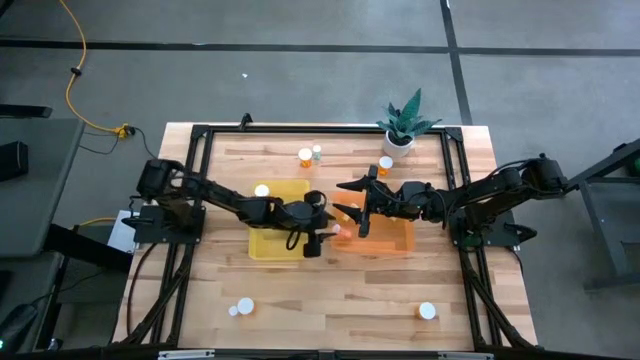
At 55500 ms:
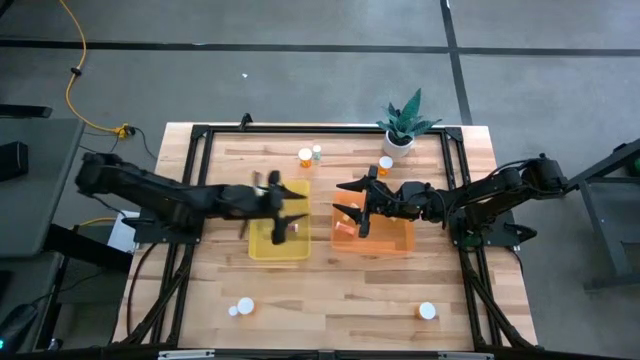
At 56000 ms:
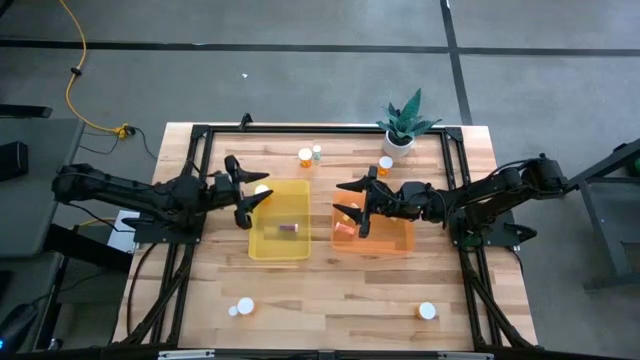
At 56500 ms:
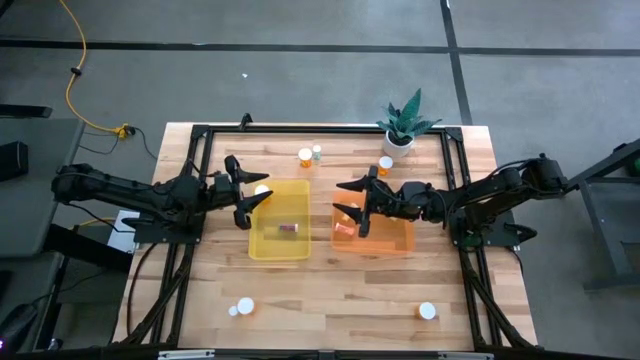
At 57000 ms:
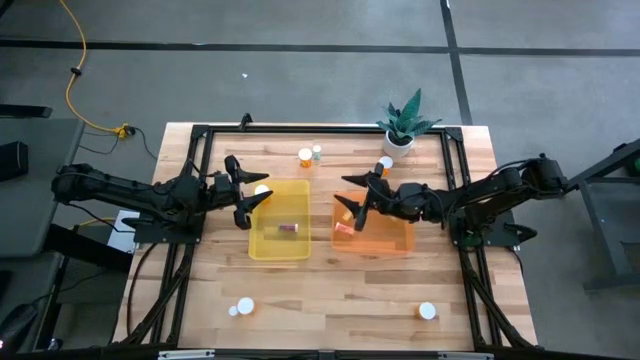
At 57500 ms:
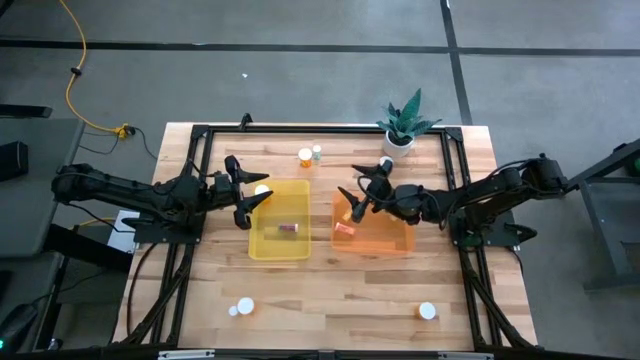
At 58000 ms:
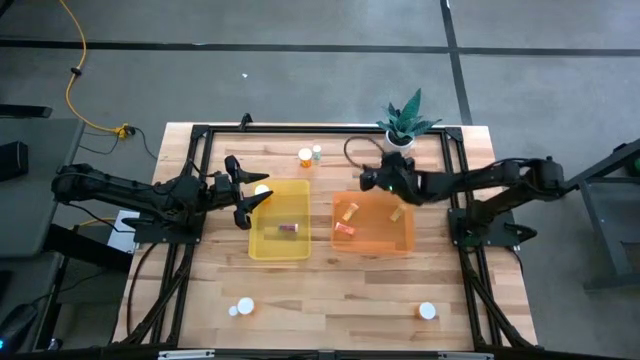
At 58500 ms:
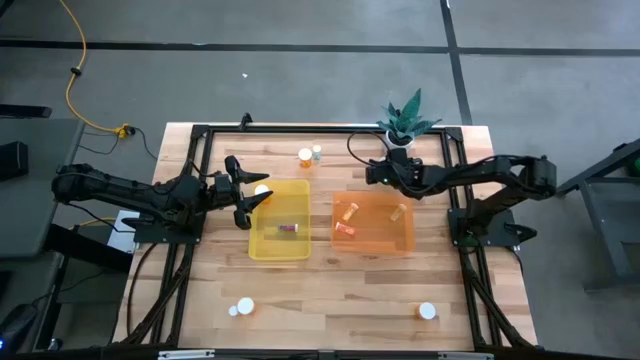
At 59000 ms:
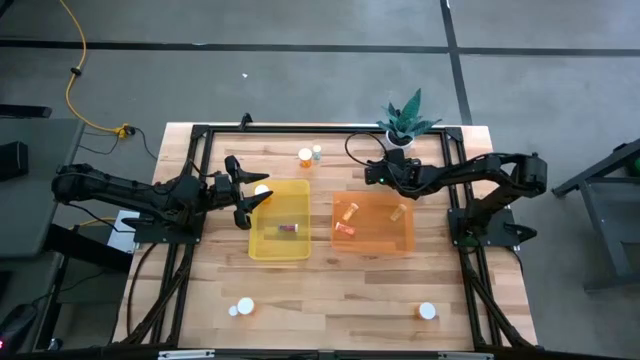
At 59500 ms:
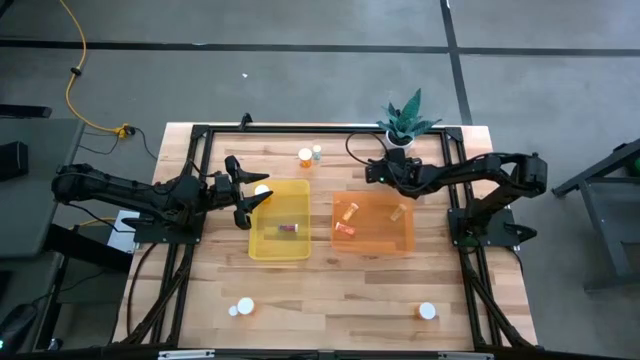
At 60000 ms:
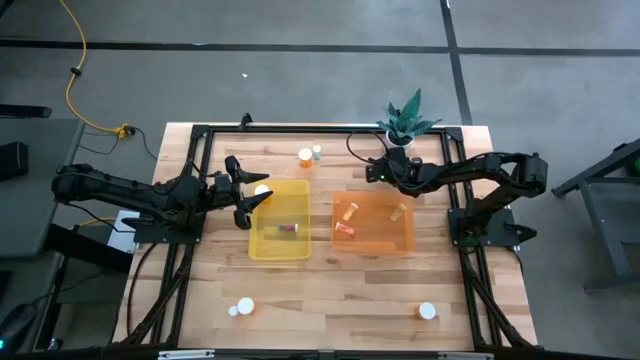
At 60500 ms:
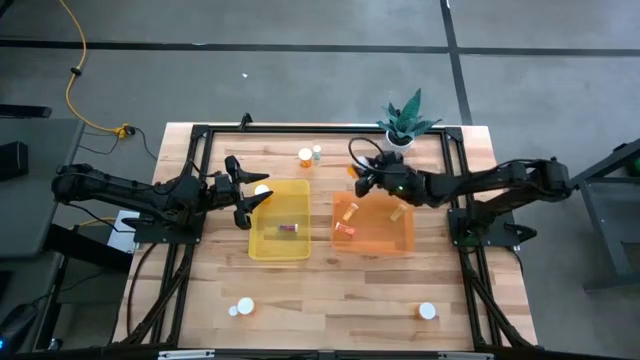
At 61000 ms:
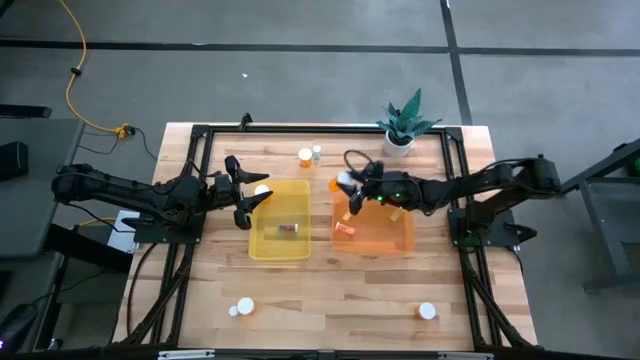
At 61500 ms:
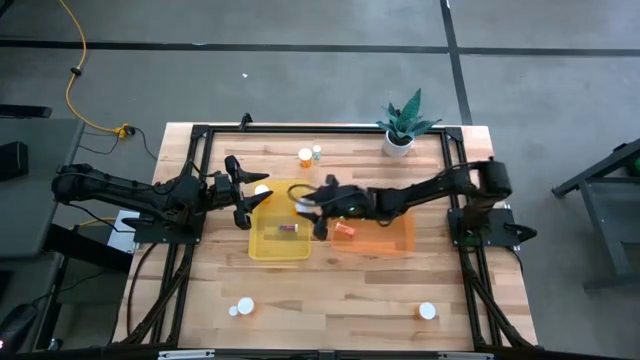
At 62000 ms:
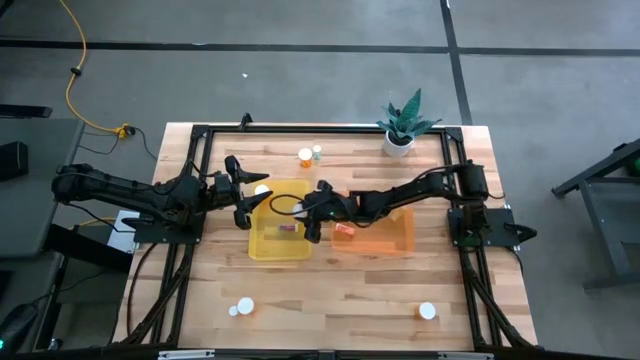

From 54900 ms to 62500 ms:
Task: Pick and place medicine bottles into bin by pill shape (circle, oval)
Put the large orange capsule bottle into the yellow bin

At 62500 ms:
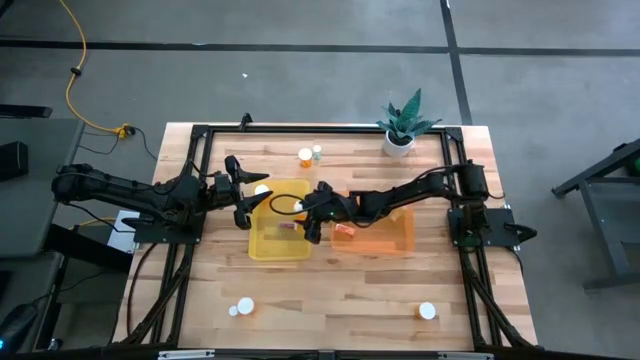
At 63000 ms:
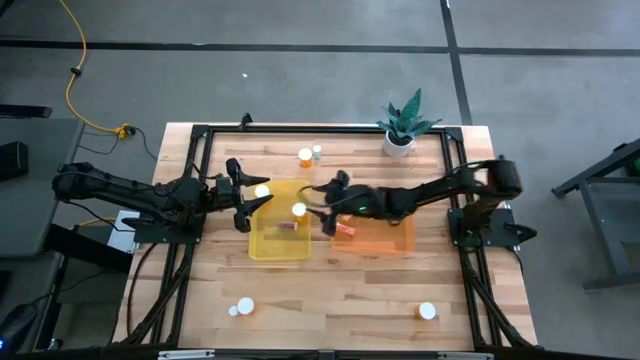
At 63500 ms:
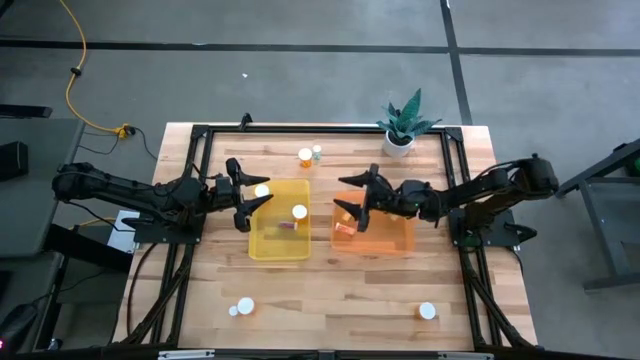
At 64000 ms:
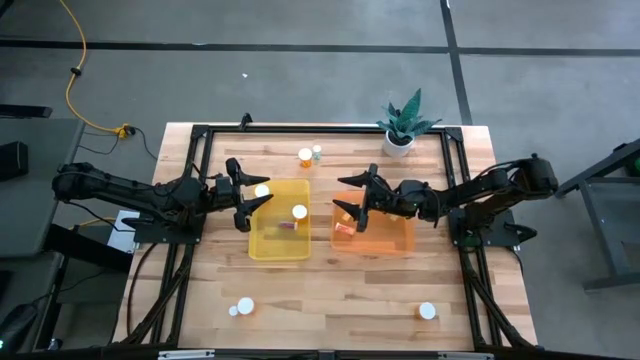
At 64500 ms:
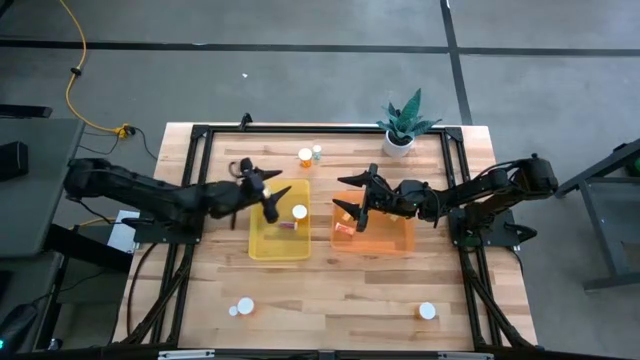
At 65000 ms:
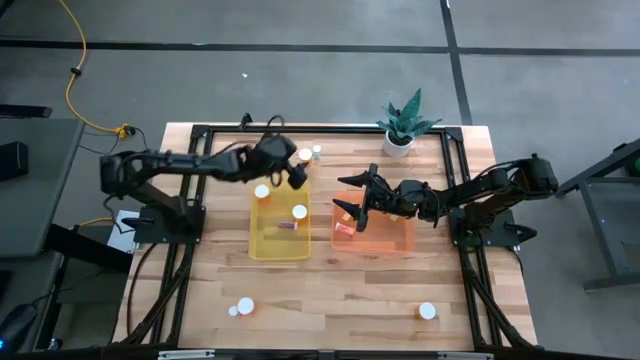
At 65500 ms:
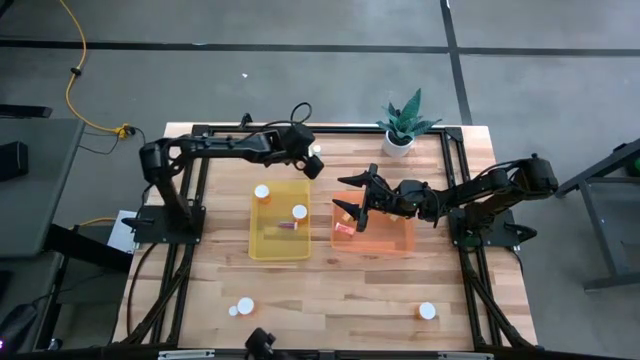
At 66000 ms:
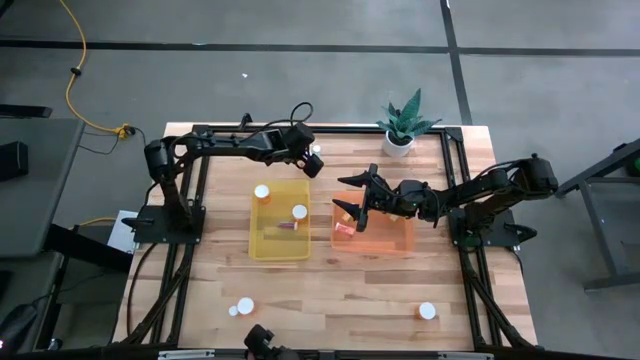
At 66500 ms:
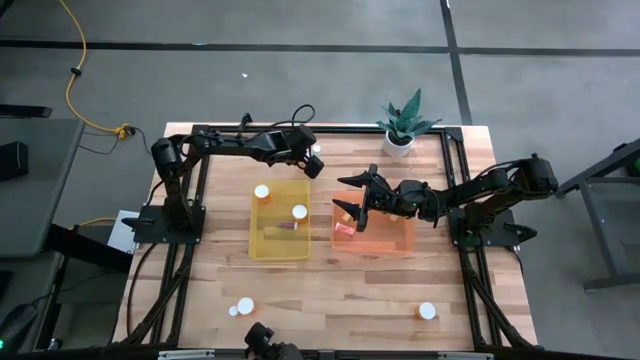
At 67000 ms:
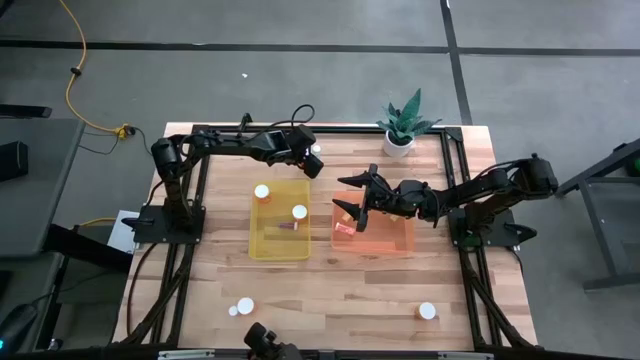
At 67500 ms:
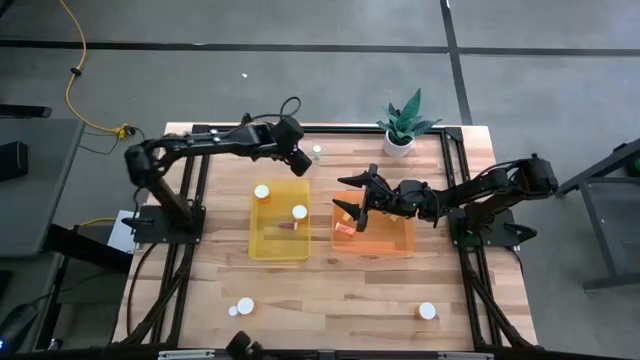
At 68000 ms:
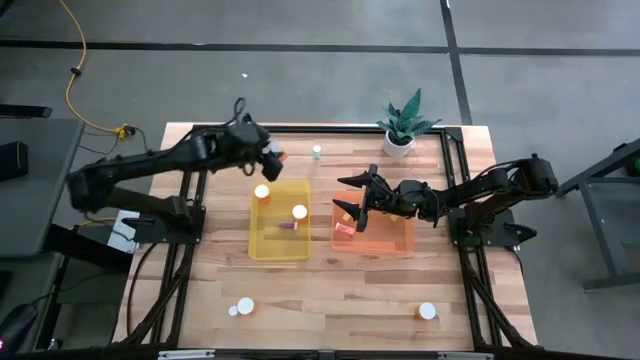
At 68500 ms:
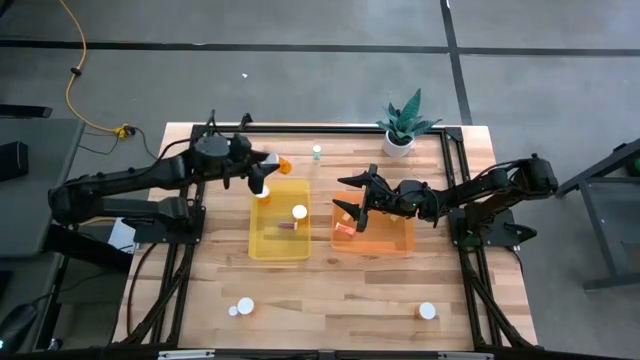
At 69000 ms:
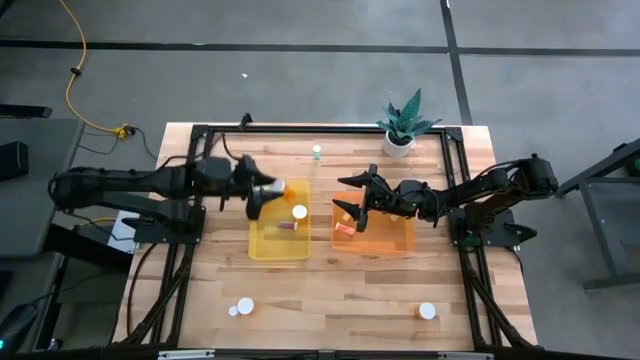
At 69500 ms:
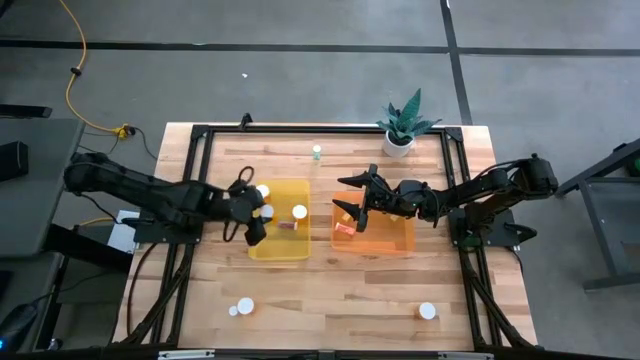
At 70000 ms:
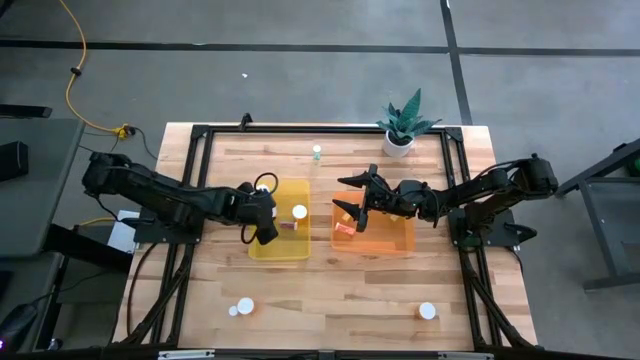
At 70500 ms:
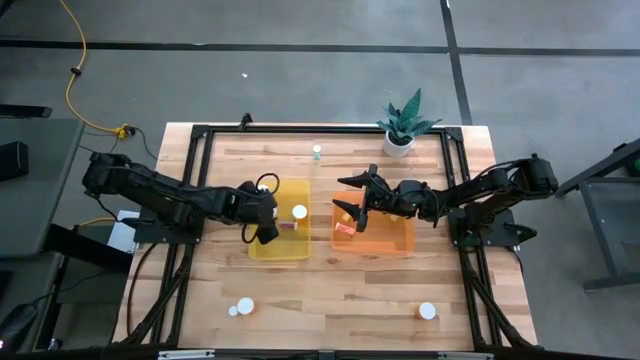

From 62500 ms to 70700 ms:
Put the top large orange capsule bottle into the yellow bin

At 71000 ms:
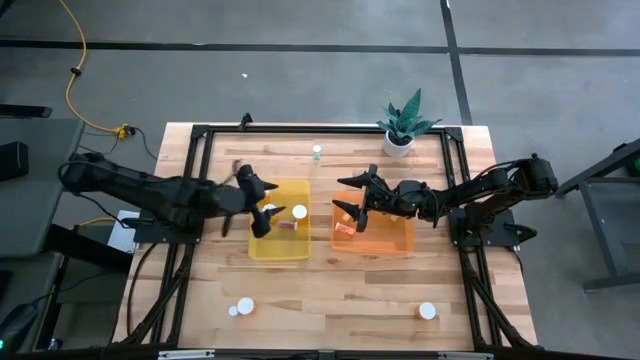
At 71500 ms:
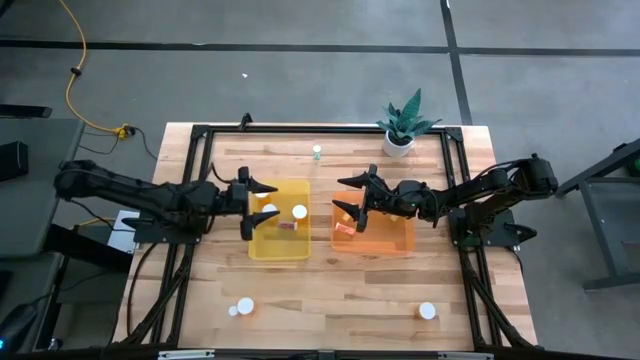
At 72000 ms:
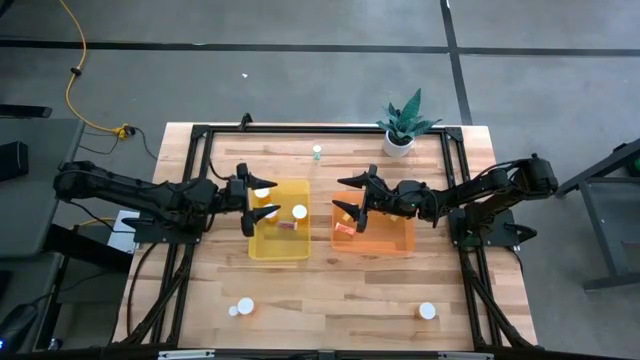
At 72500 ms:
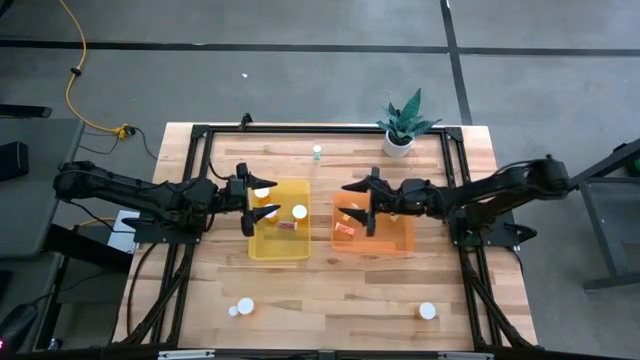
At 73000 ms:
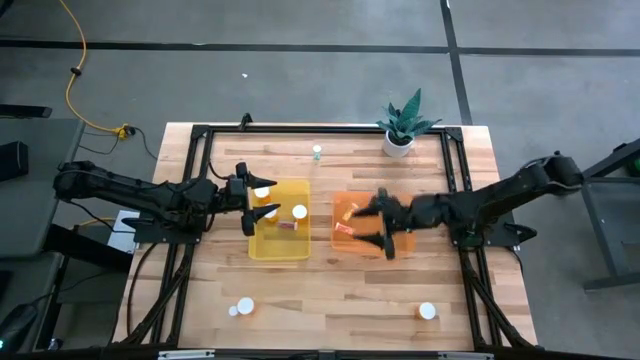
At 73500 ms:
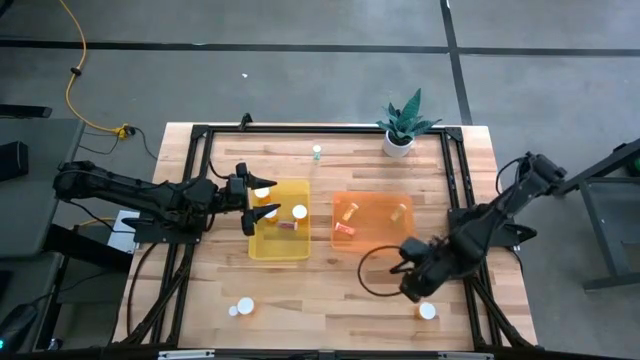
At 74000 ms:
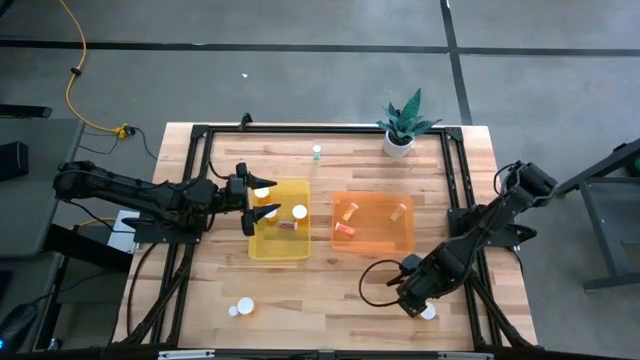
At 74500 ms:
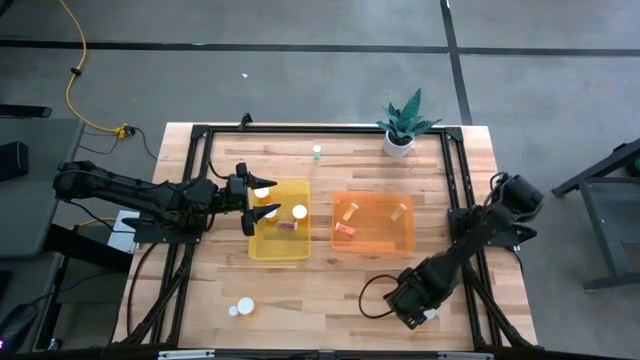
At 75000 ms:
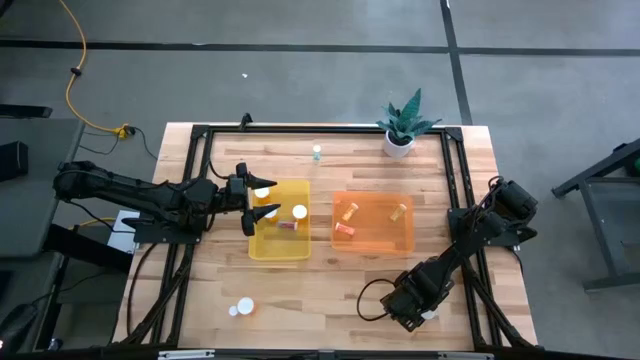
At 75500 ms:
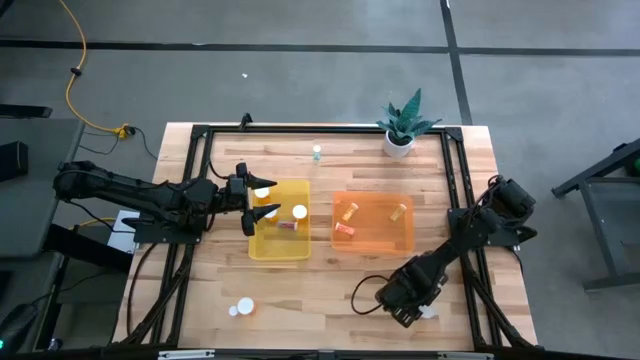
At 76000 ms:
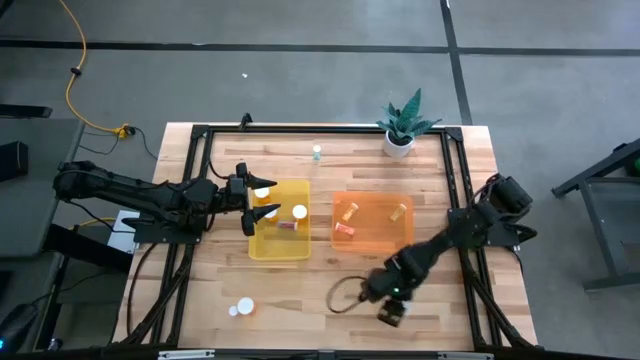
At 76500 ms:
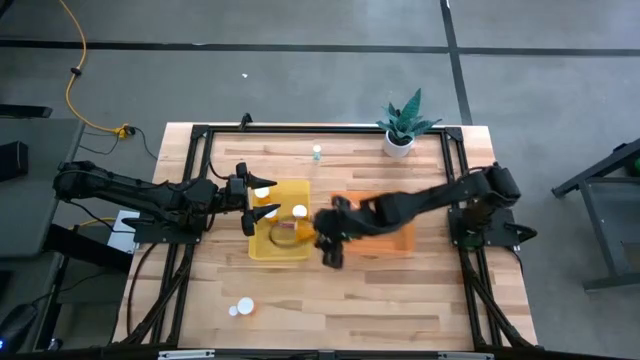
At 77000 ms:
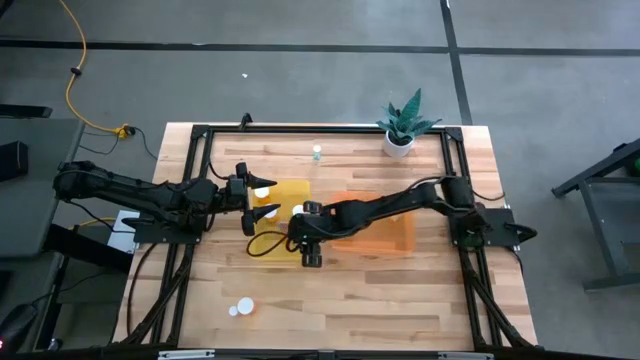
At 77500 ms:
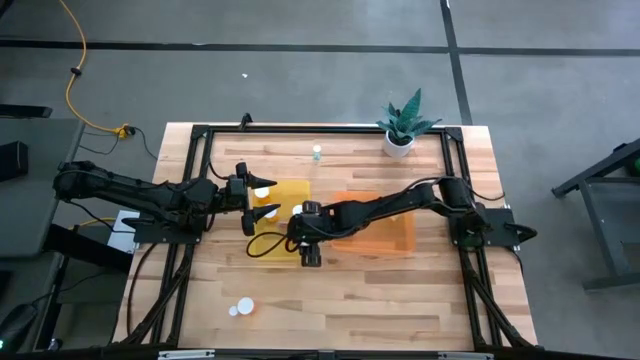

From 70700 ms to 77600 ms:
Put the right large orange capsule bottle into the yellow bin
